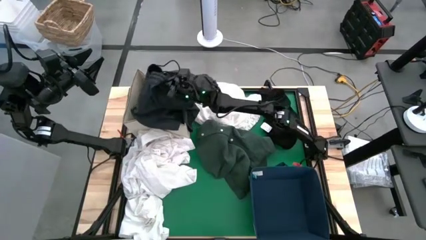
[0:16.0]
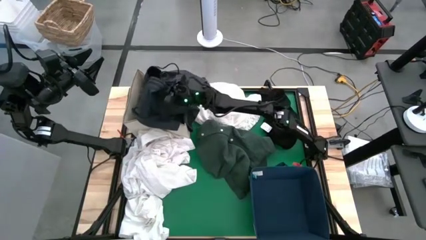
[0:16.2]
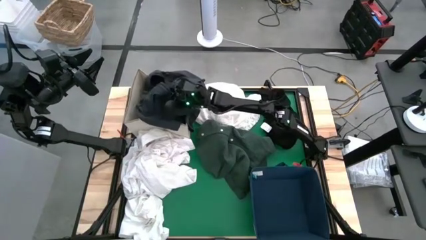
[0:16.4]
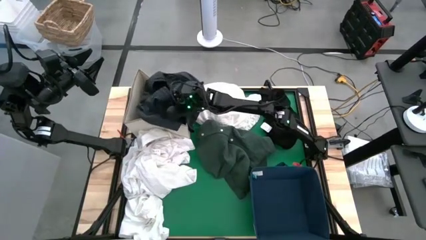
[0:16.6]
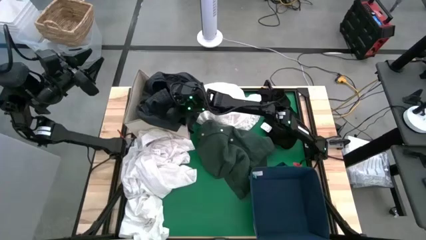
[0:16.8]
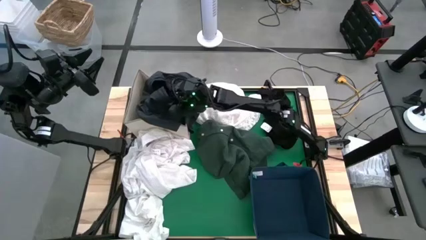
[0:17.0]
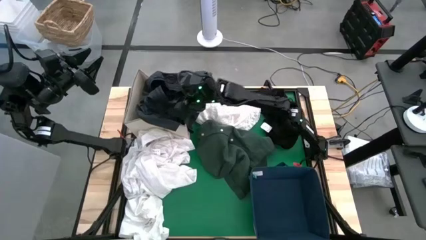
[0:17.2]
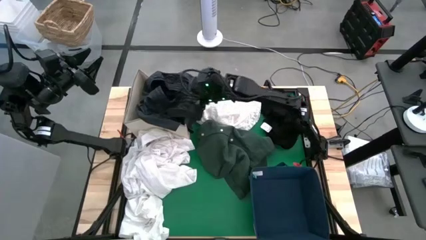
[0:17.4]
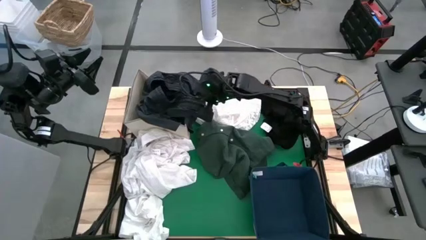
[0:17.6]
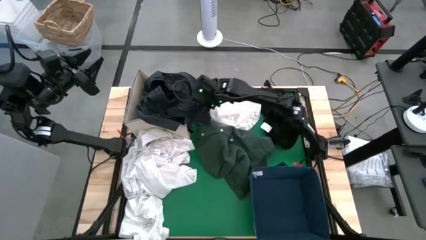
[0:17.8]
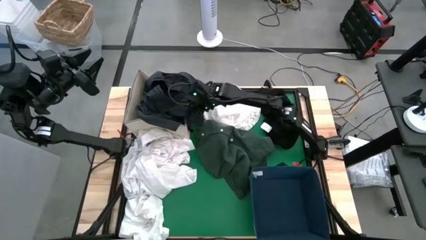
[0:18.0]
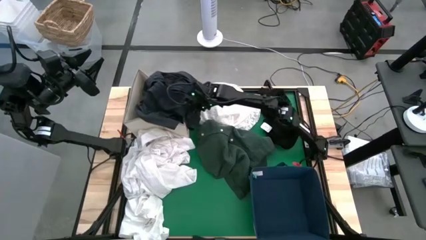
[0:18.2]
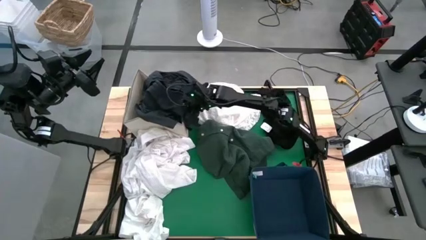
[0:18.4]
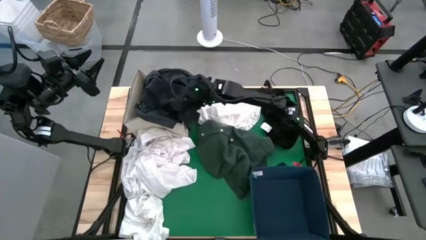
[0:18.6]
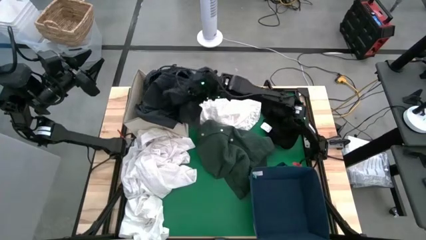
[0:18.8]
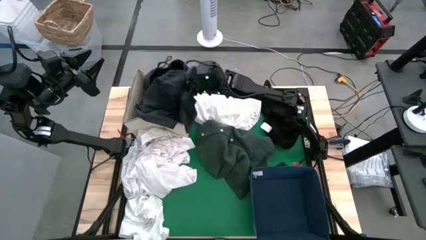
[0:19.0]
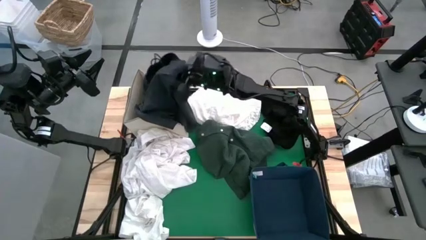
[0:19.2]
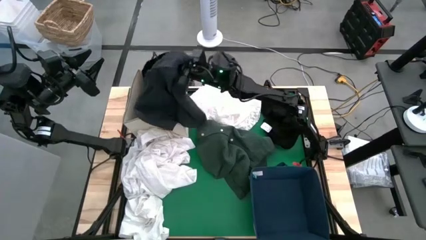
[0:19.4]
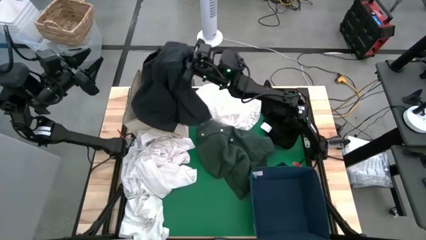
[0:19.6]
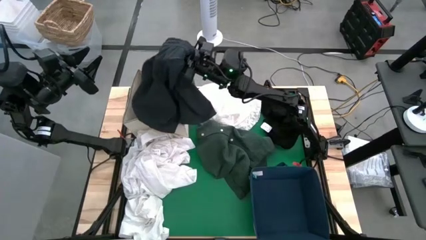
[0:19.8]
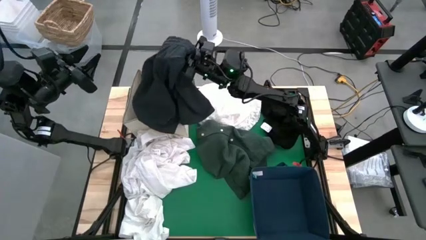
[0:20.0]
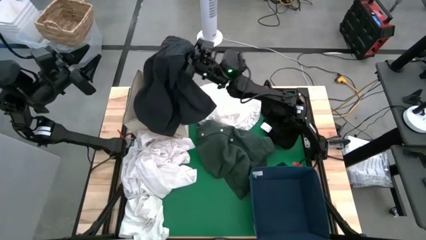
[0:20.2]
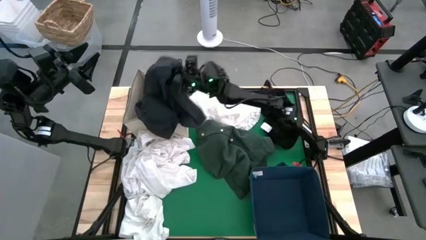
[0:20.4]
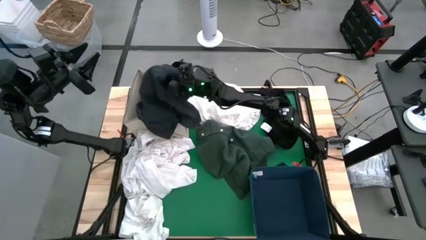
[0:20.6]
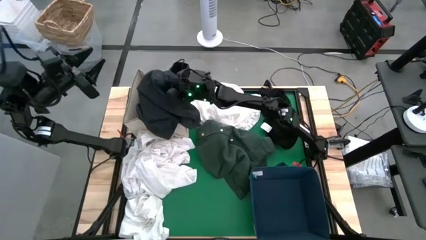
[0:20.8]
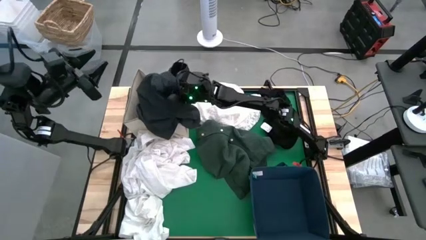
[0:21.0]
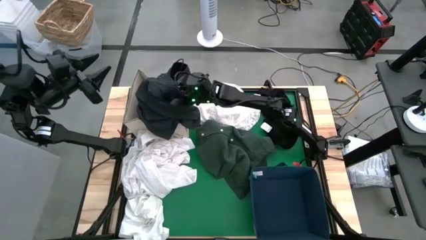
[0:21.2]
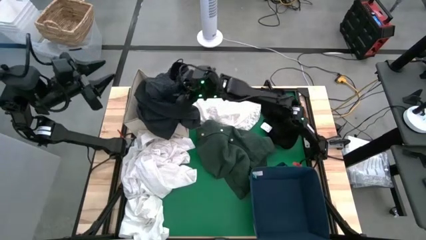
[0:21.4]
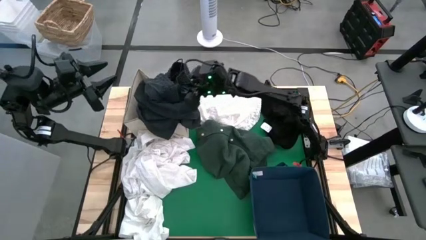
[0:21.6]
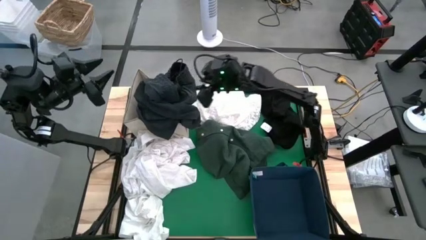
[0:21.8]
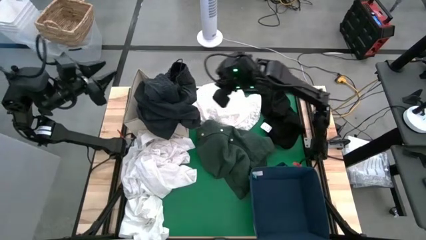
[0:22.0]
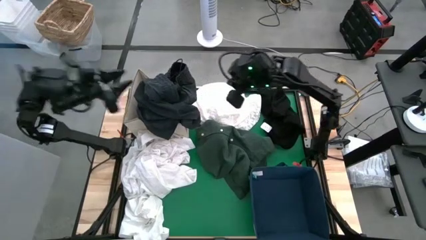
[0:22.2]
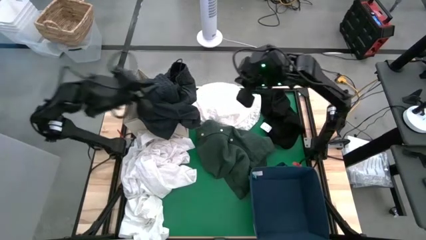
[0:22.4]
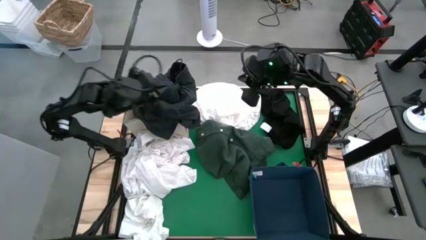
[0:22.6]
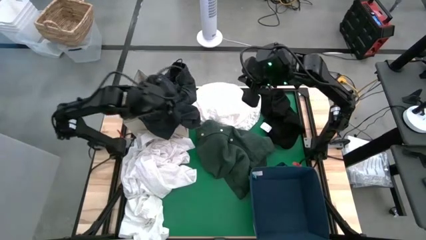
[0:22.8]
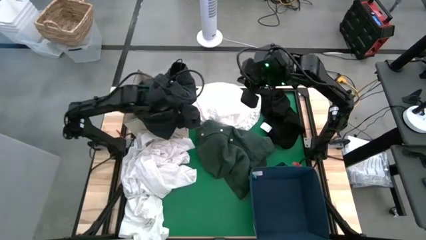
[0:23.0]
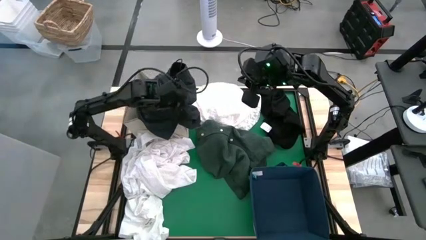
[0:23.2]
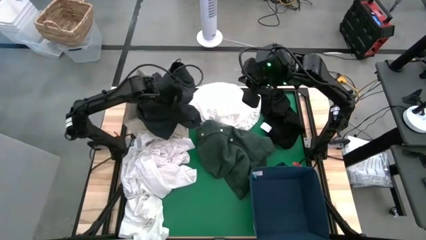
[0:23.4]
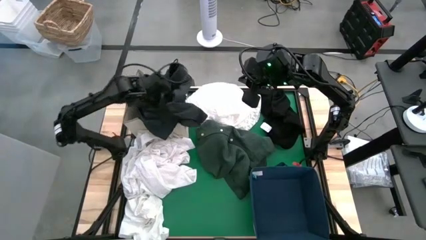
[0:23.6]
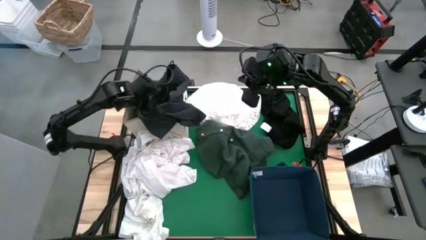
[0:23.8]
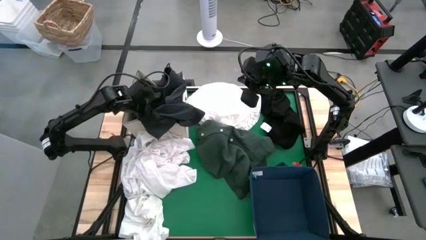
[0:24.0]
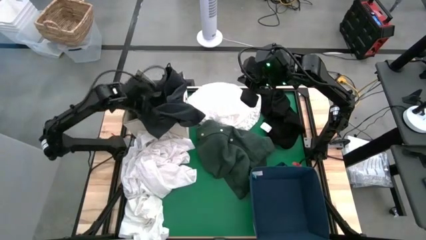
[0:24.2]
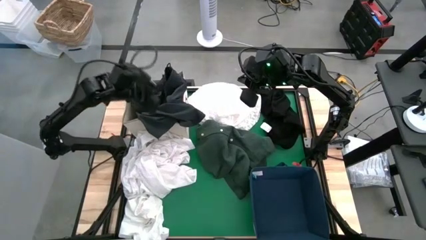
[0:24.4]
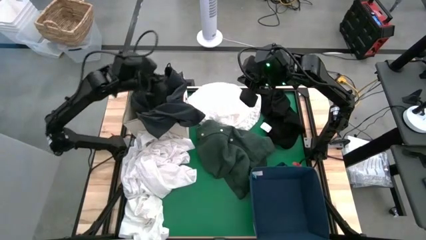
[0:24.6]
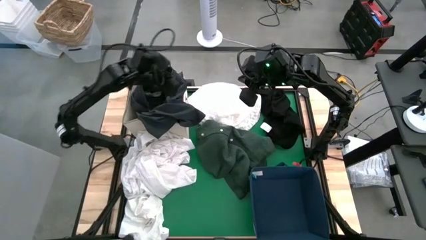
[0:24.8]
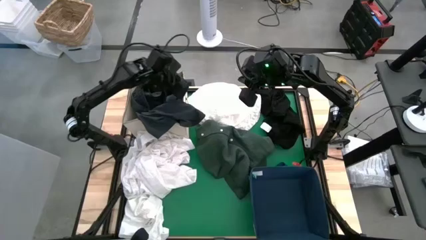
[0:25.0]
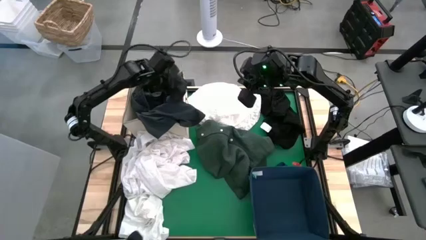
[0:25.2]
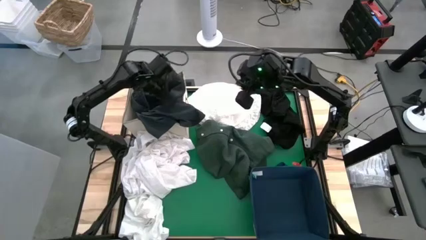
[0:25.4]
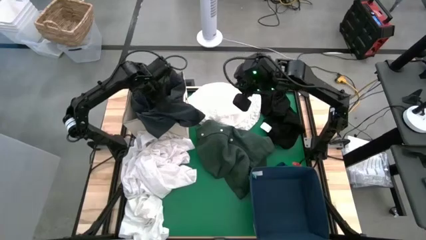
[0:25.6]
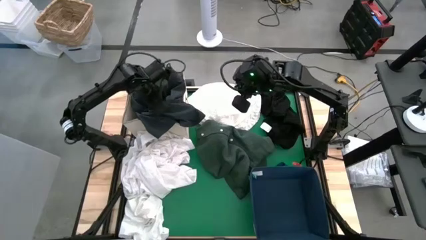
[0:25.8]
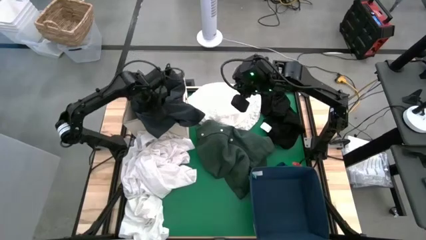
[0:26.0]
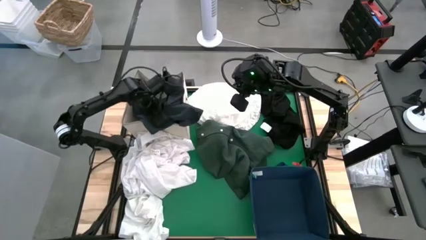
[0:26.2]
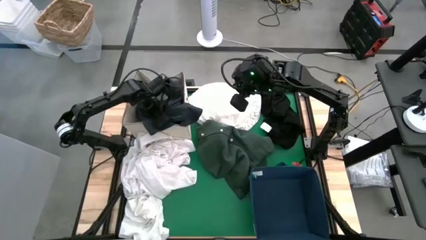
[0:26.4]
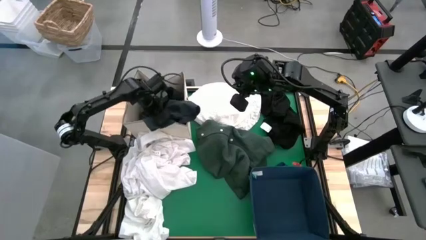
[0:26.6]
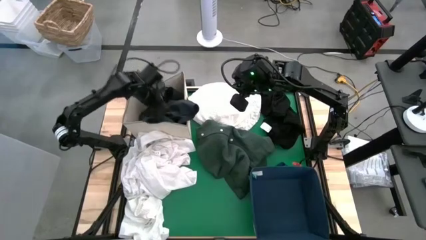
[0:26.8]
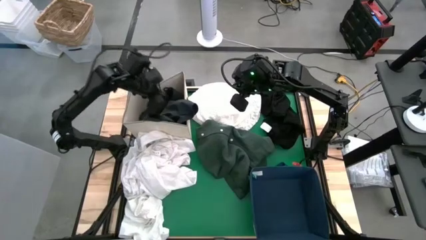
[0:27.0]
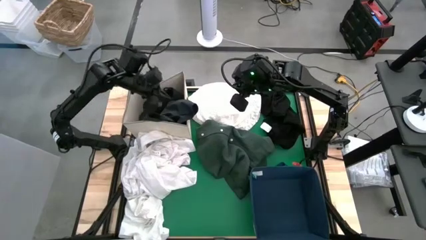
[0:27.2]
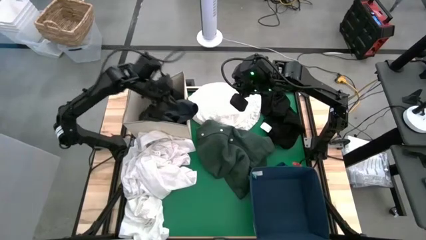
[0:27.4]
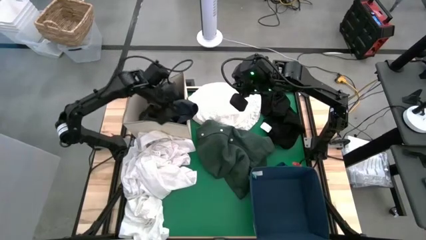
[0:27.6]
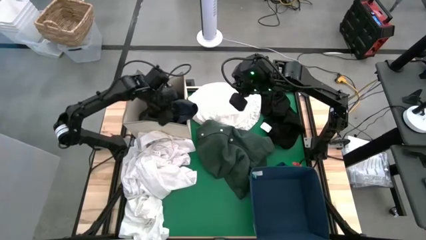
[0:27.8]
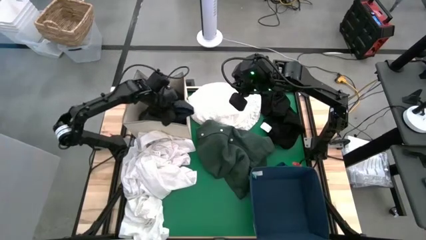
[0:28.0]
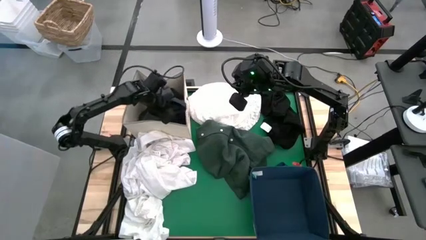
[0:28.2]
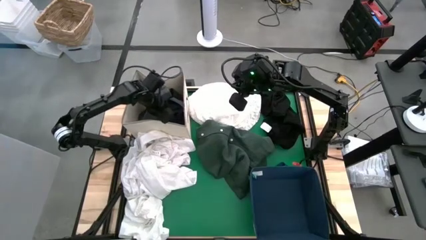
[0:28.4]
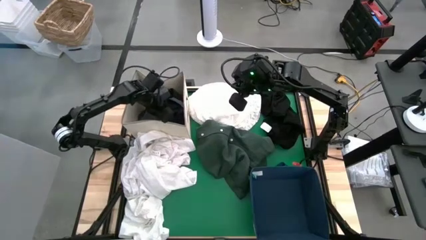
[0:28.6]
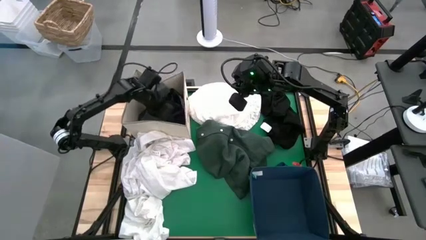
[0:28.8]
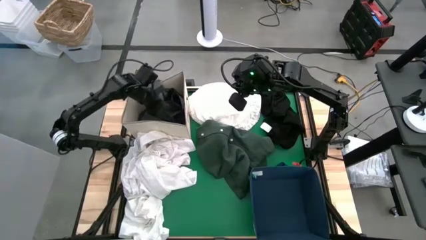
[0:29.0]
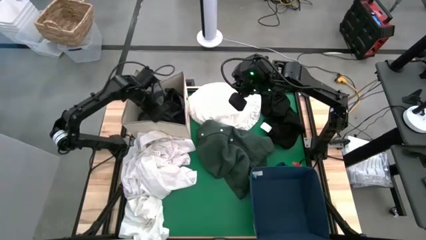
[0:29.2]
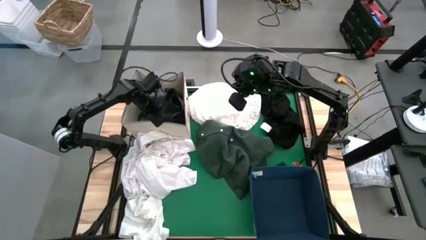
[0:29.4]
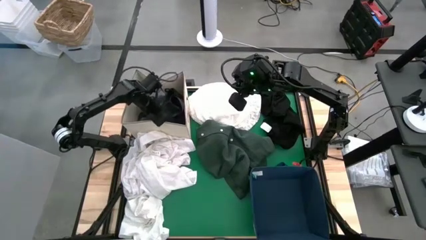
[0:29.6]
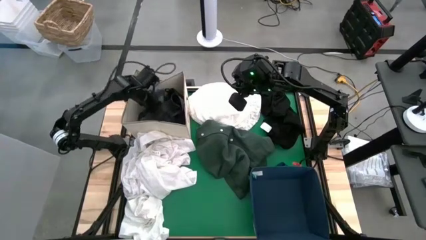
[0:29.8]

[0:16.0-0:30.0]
Put the black cloth into the white bin
